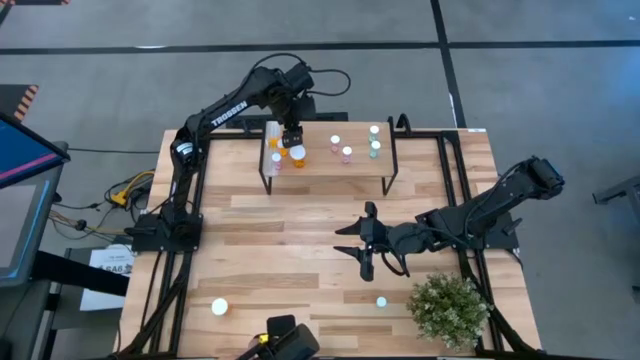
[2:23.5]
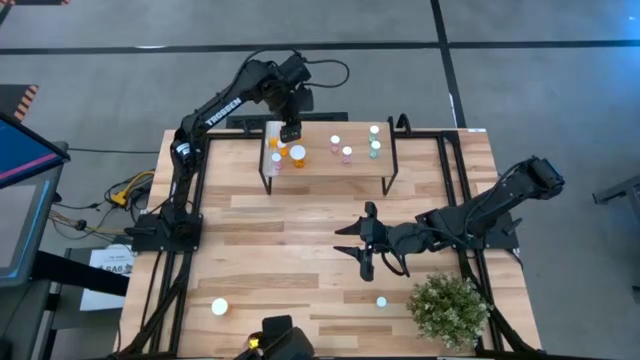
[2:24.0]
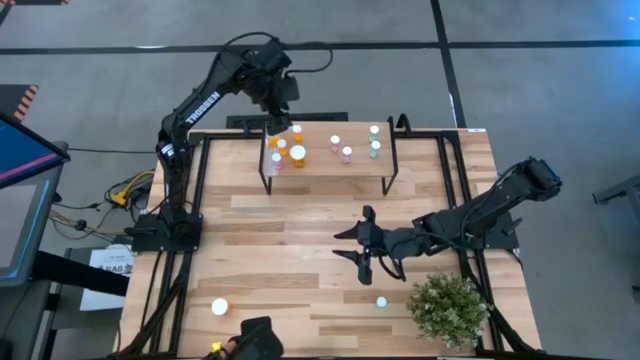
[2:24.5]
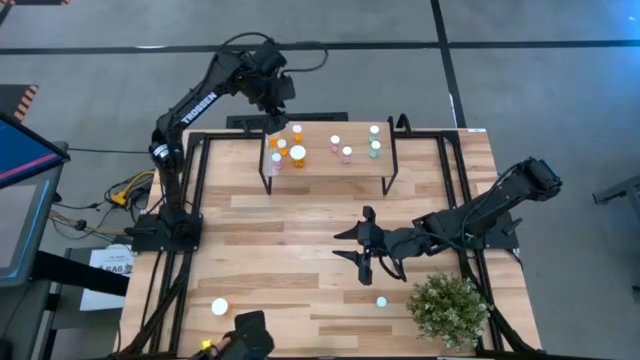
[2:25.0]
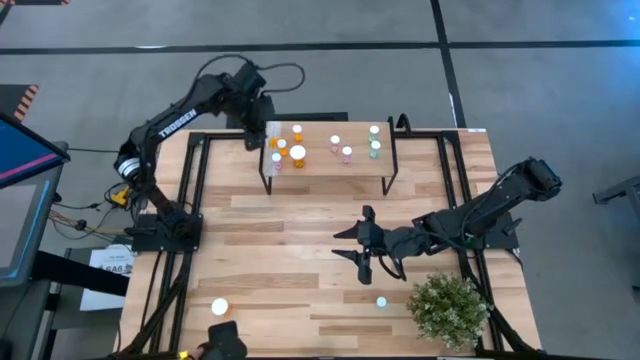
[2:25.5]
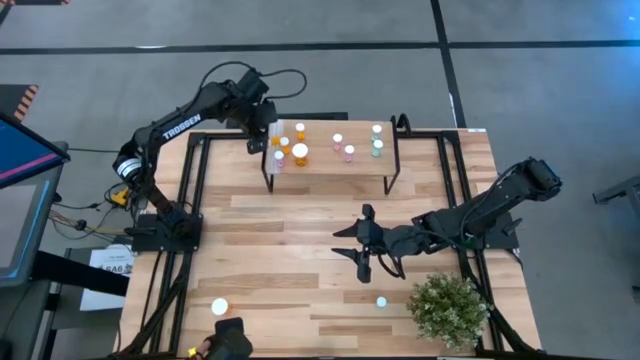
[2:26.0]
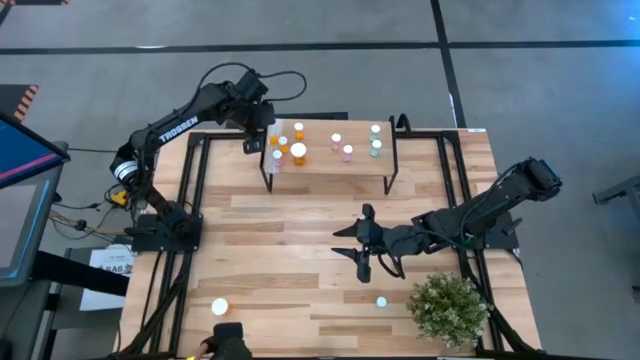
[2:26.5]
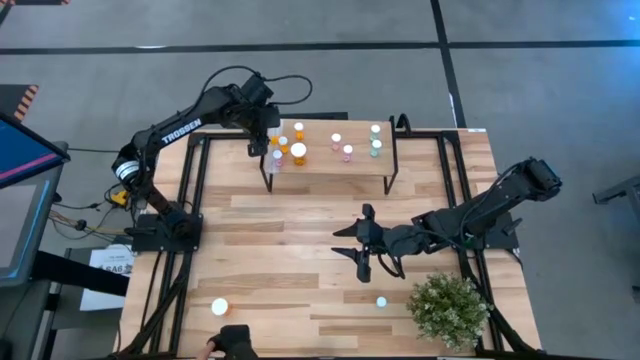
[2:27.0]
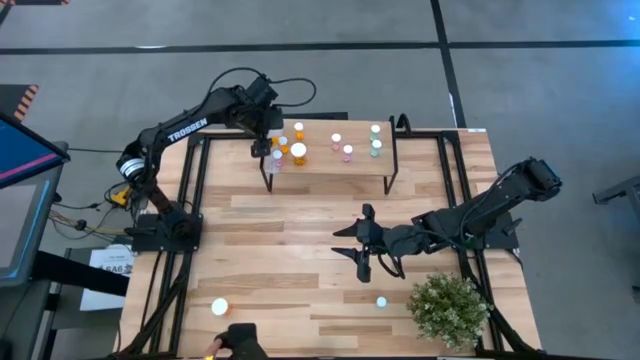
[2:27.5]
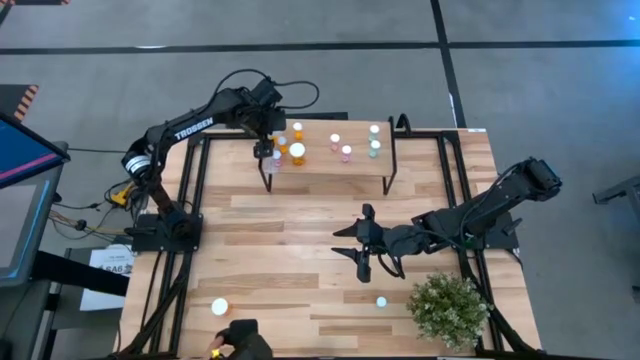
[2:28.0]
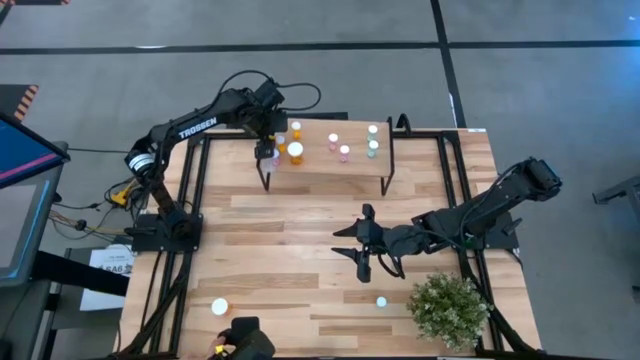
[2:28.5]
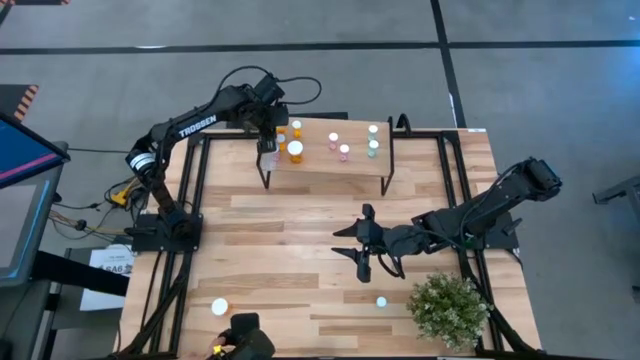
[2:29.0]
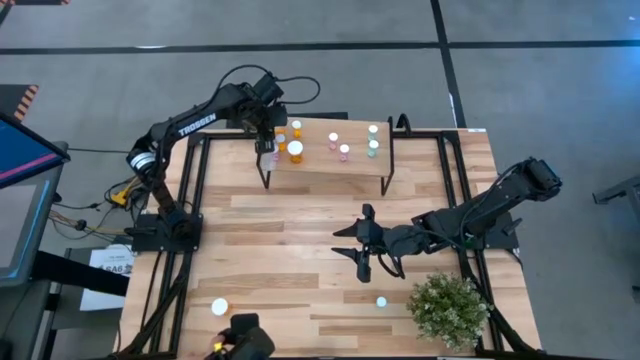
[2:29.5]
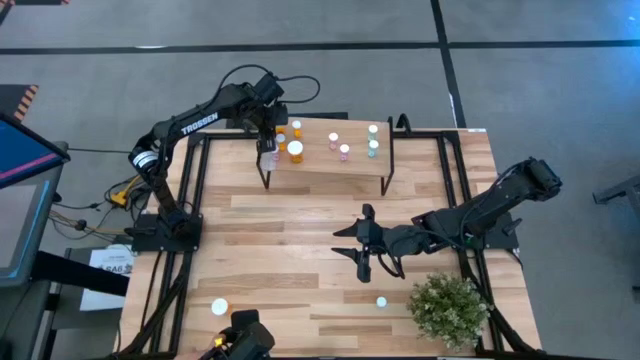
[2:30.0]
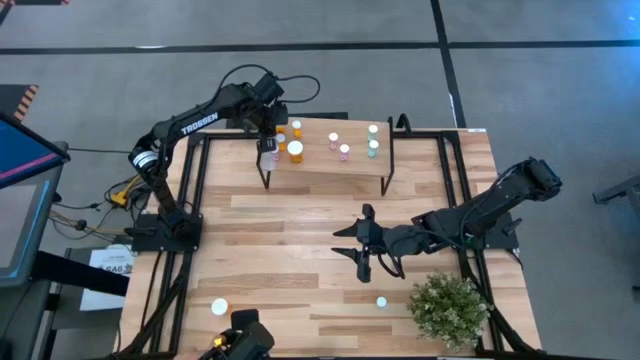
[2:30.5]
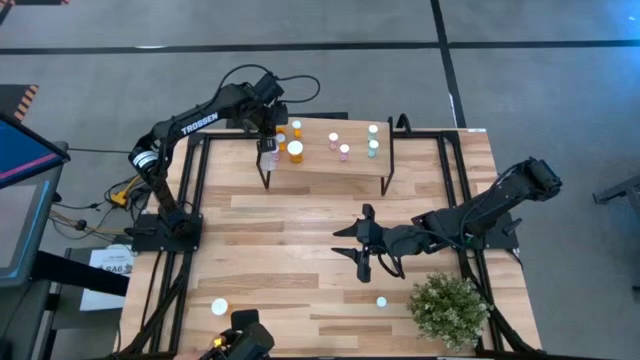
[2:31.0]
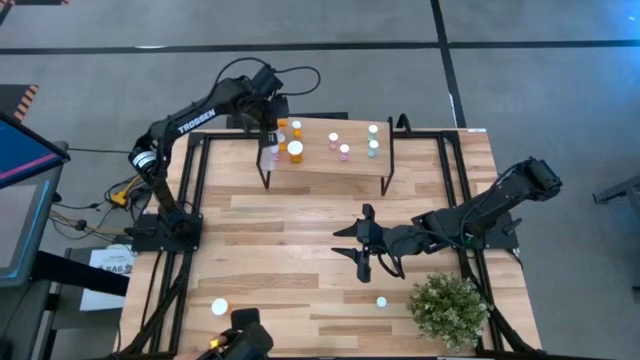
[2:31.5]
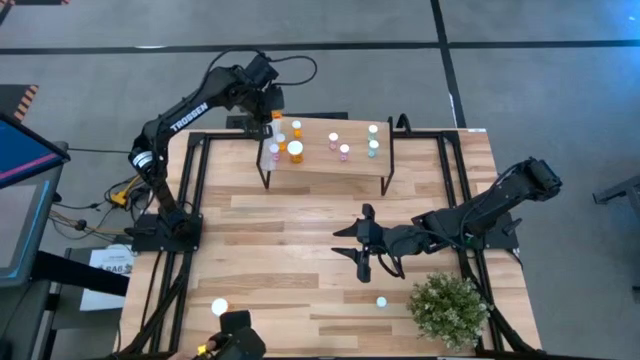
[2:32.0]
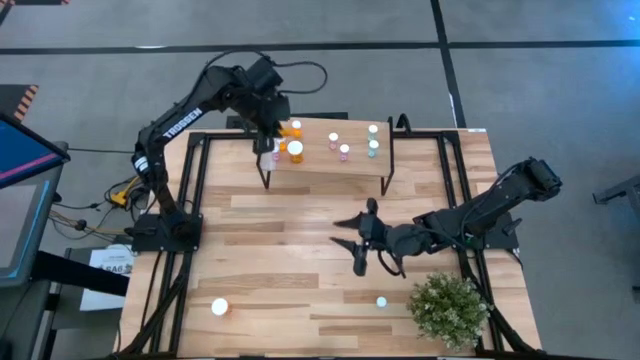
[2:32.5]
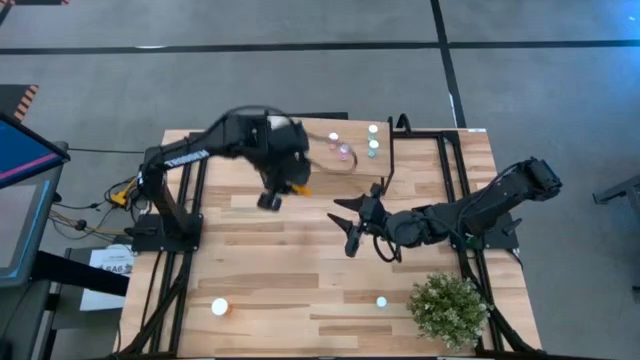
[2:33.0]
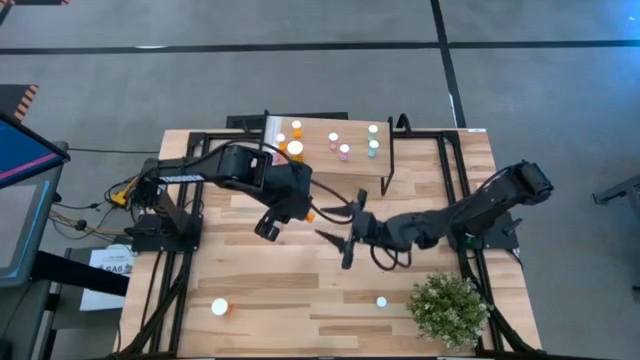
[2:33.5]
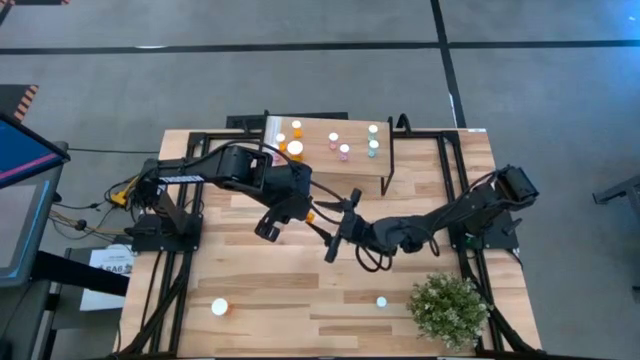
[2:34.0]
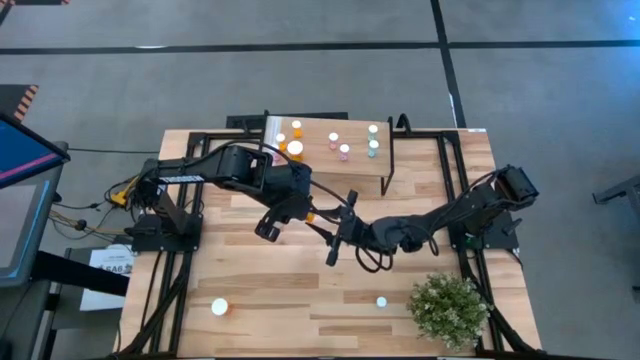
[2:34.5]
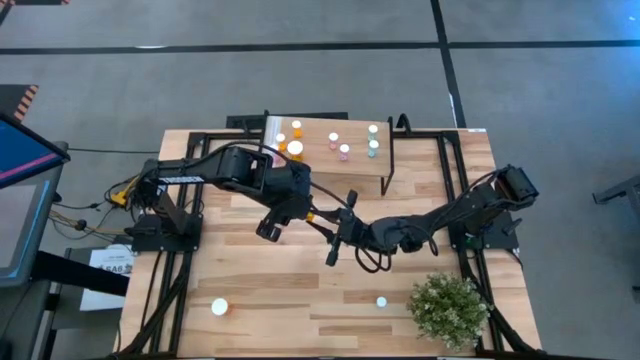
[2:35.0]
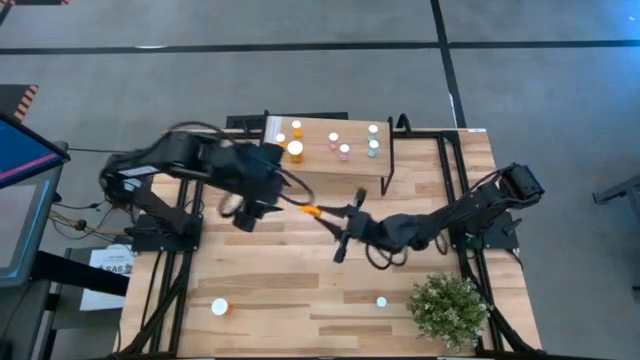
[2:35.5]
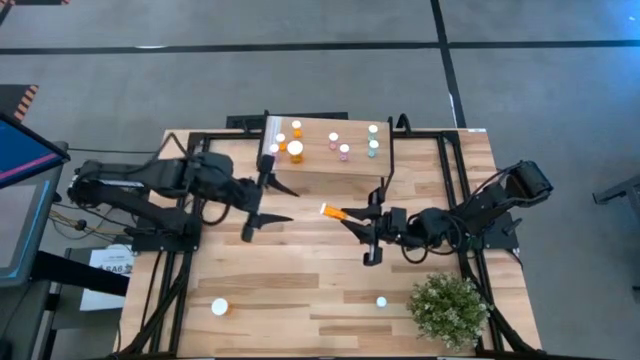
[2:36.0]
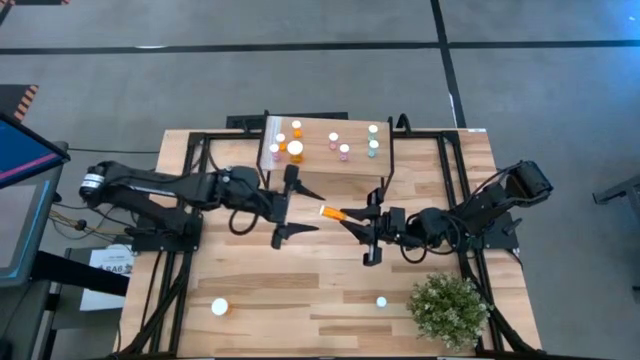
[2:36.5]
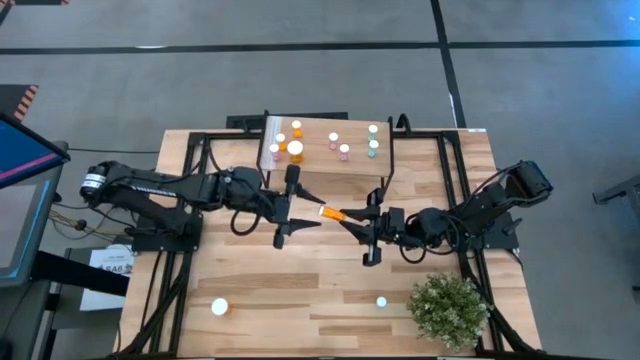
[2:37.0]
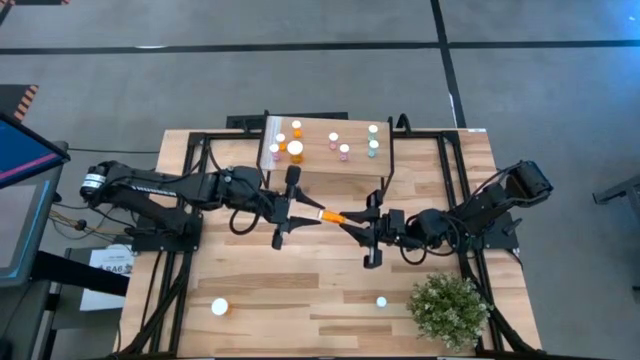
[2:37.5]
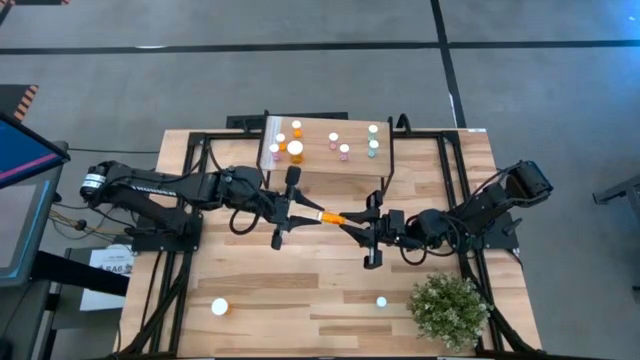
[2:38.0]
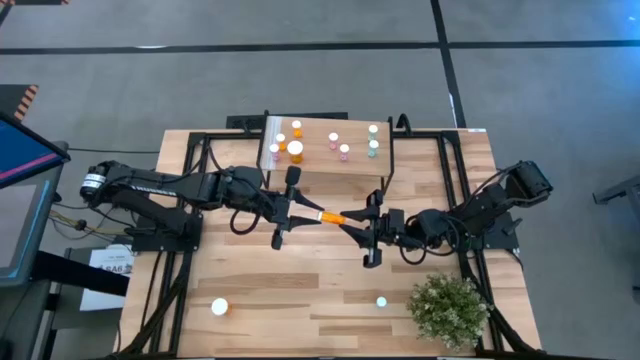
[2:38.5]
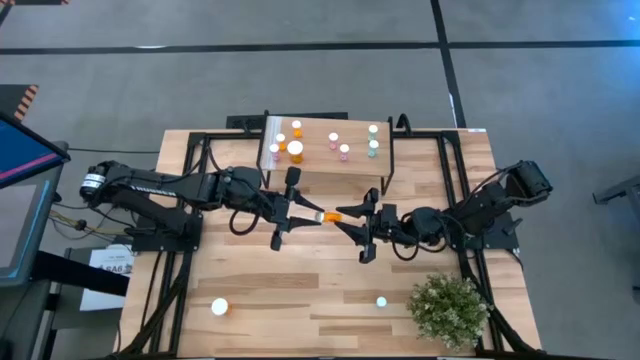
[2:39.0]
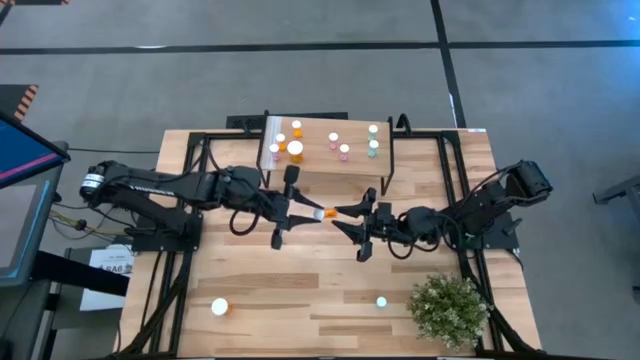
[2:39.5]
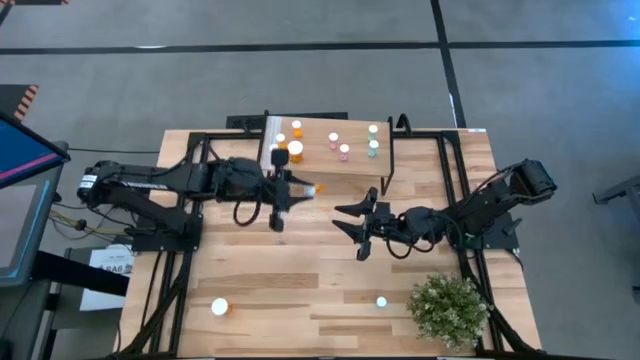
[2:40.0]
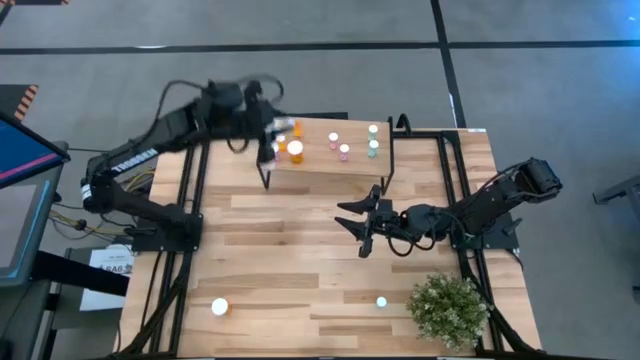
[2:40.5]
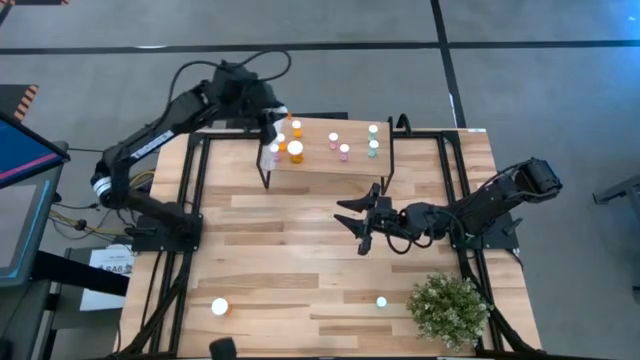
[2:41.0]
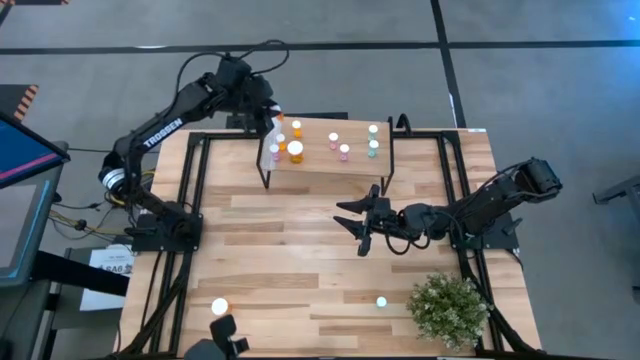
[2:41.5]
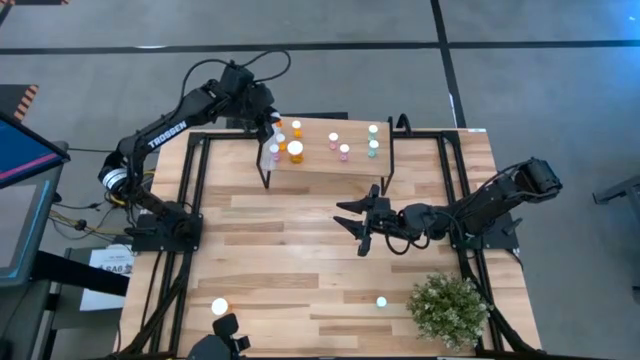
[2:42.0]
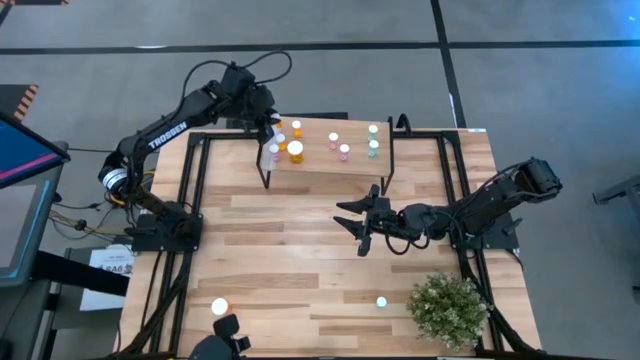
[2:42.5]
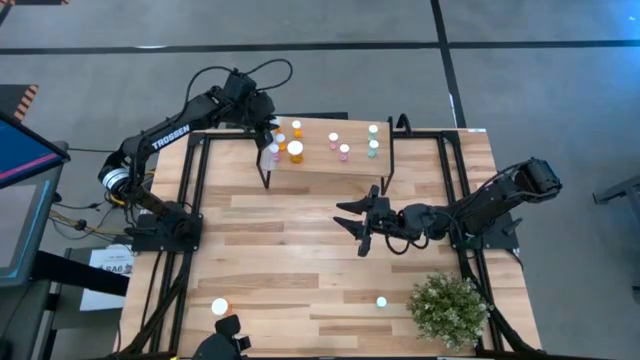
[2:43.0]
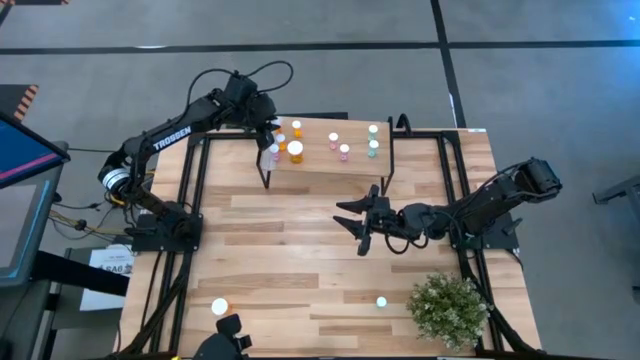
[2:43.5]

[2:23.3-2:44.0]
Task: Pick and place medicine bottles onto shelf by color
Adjust the small orange pill bottle on the shelf
